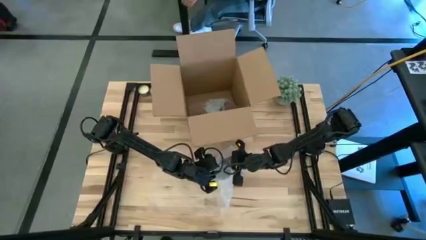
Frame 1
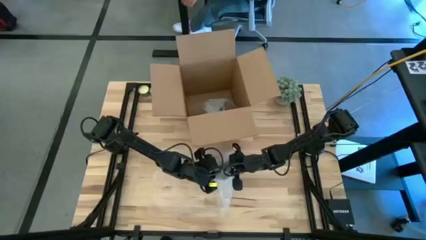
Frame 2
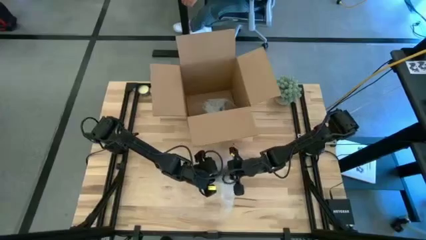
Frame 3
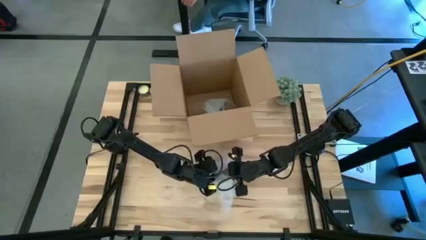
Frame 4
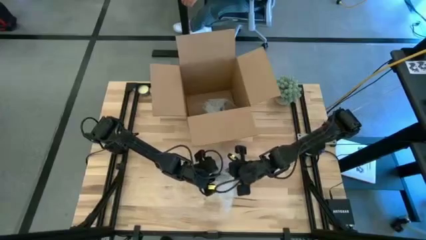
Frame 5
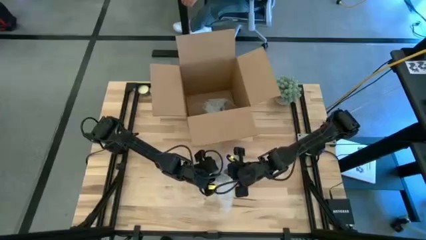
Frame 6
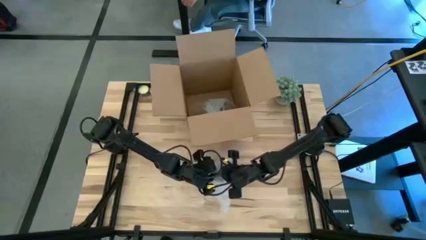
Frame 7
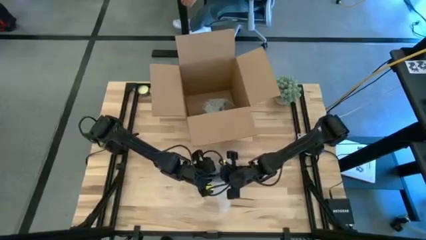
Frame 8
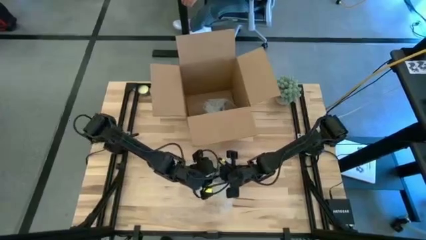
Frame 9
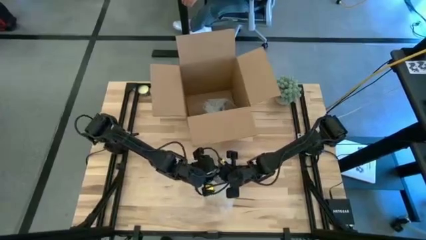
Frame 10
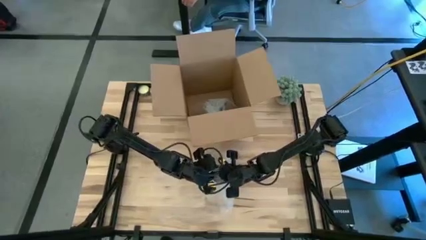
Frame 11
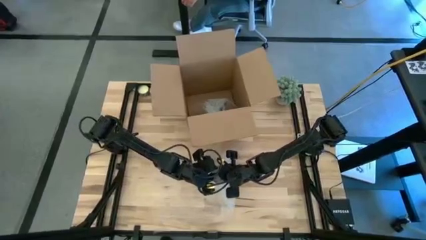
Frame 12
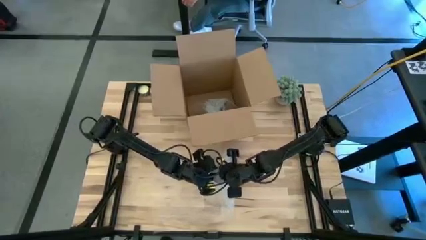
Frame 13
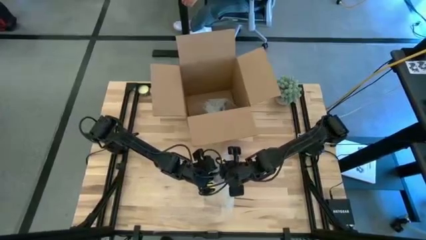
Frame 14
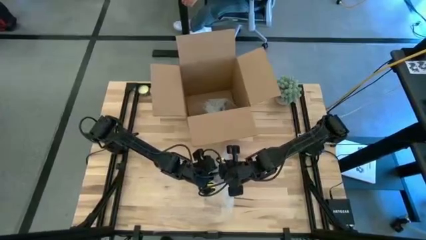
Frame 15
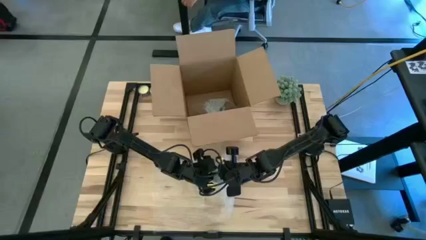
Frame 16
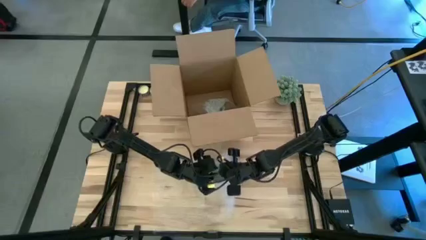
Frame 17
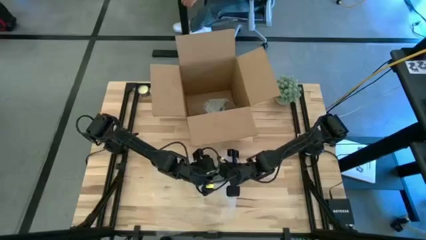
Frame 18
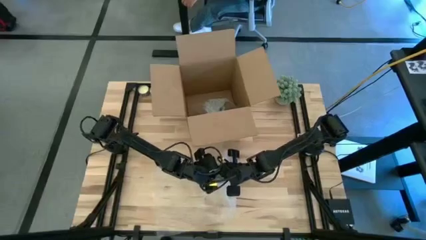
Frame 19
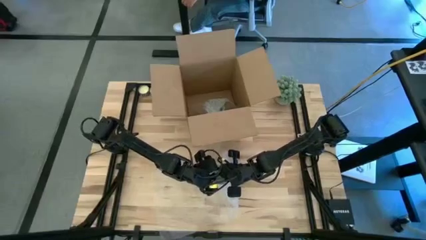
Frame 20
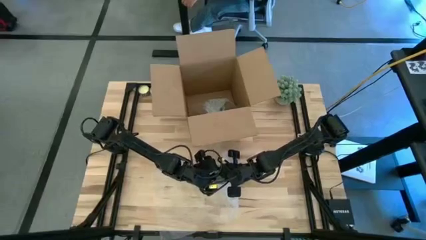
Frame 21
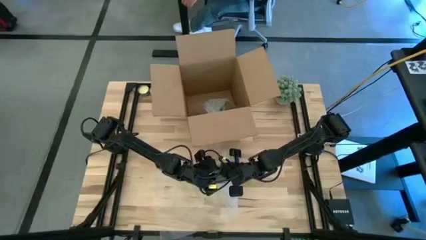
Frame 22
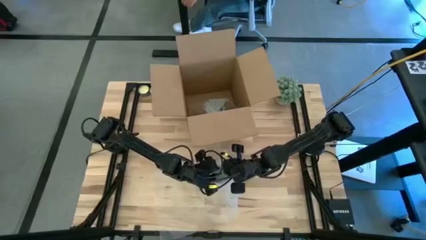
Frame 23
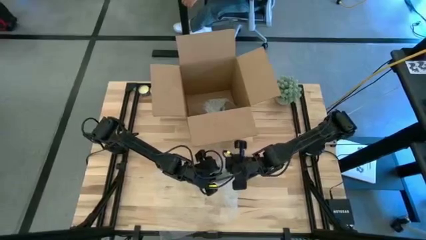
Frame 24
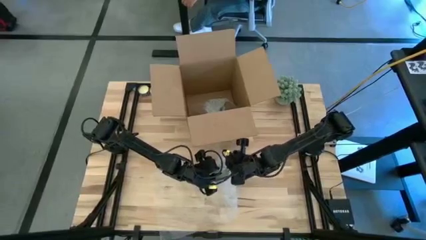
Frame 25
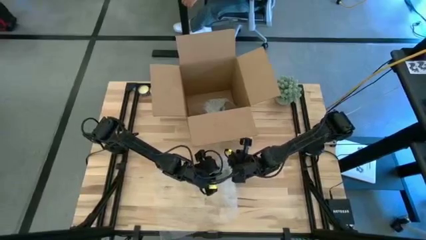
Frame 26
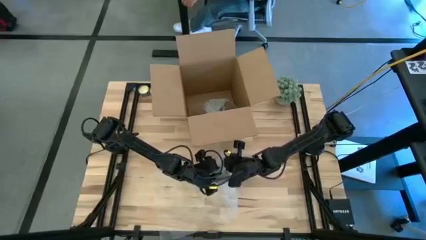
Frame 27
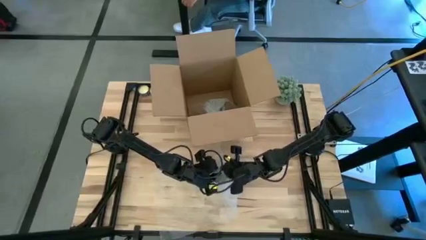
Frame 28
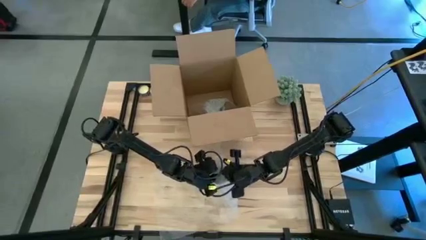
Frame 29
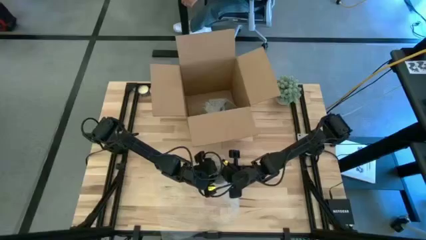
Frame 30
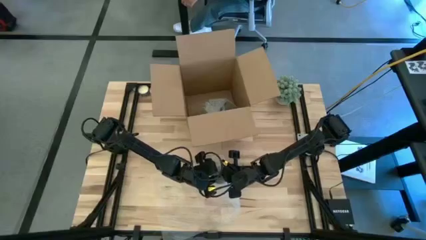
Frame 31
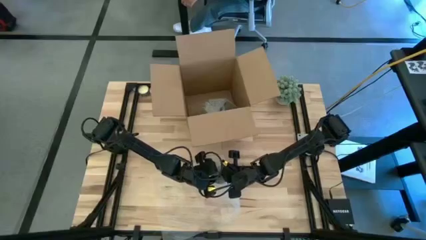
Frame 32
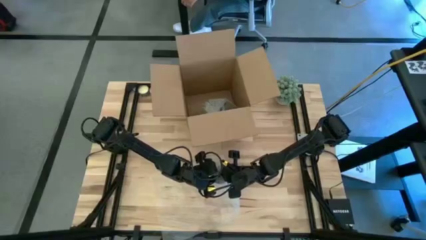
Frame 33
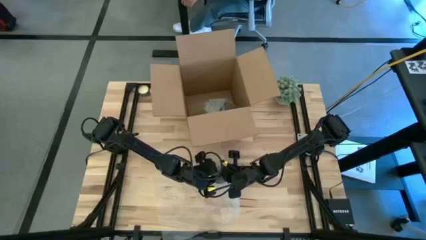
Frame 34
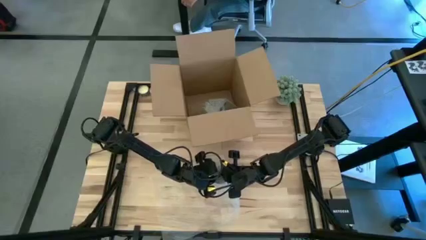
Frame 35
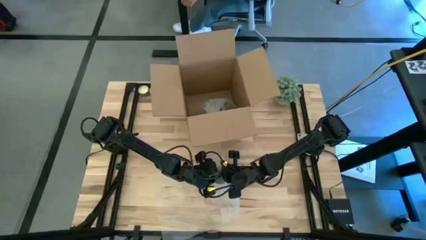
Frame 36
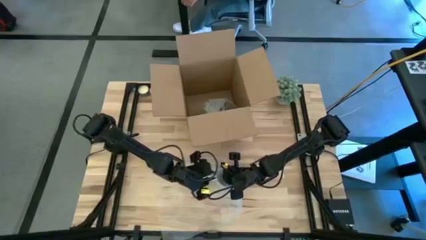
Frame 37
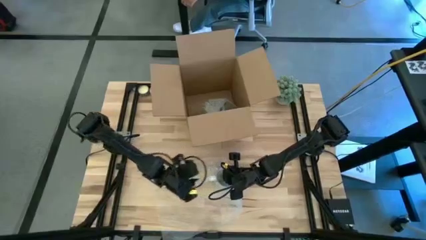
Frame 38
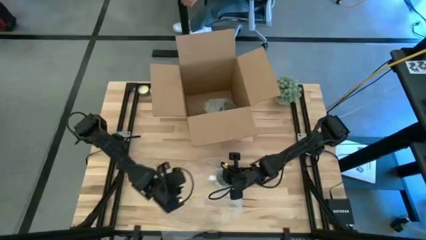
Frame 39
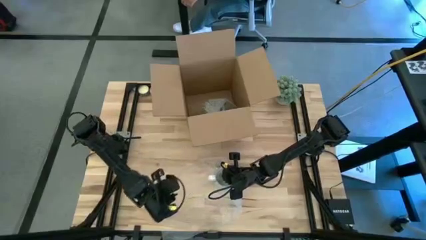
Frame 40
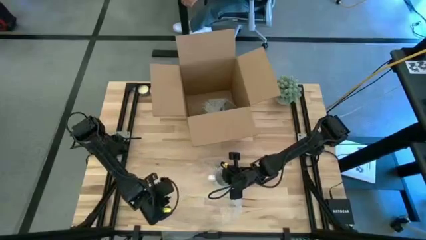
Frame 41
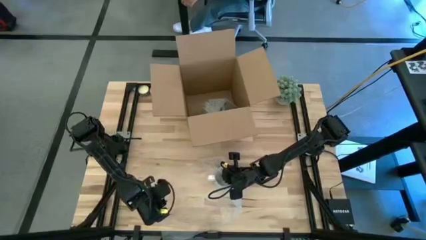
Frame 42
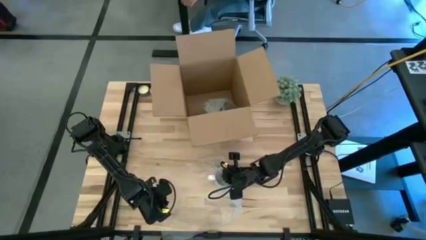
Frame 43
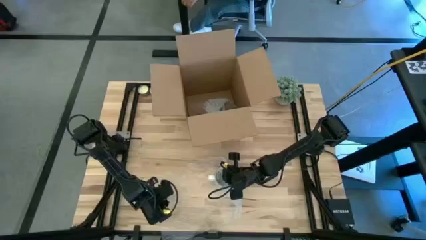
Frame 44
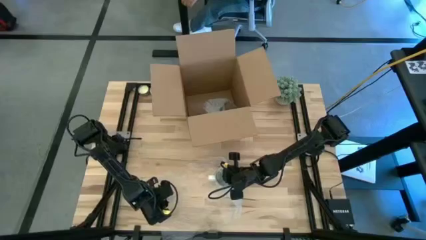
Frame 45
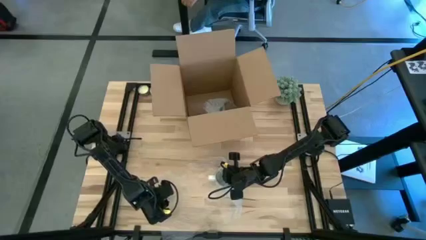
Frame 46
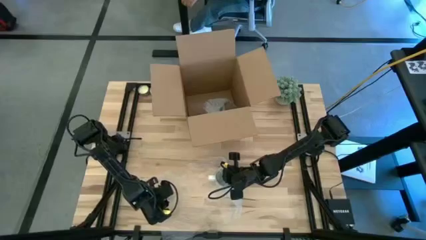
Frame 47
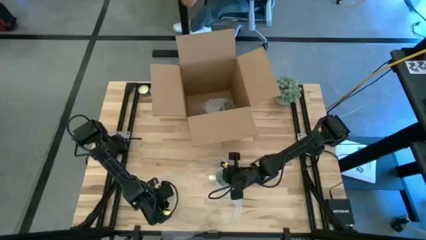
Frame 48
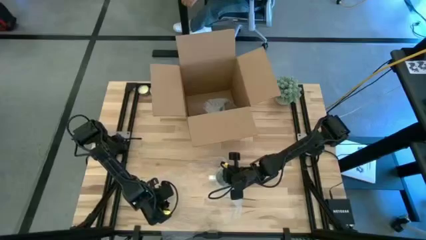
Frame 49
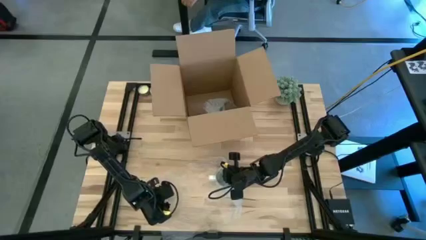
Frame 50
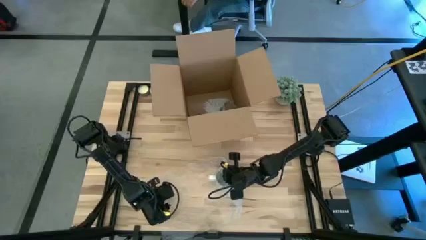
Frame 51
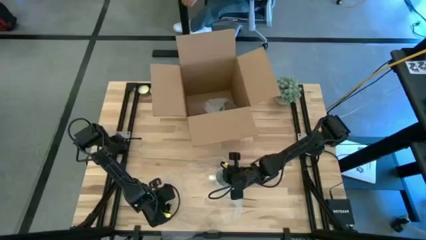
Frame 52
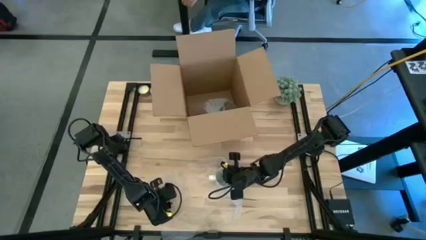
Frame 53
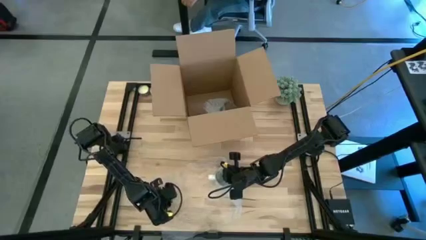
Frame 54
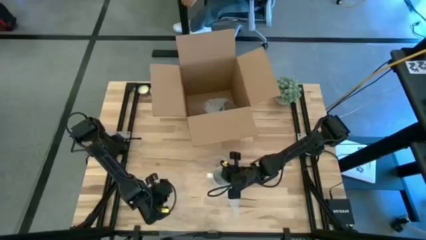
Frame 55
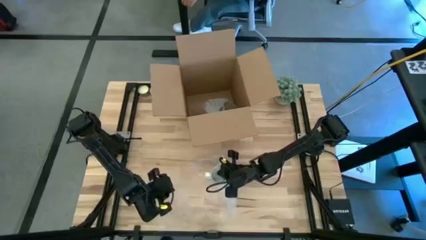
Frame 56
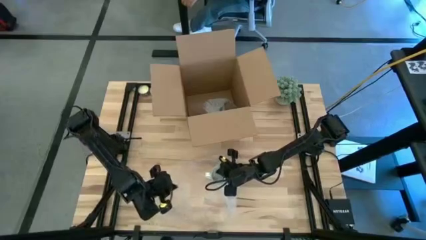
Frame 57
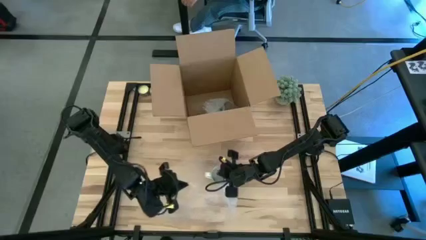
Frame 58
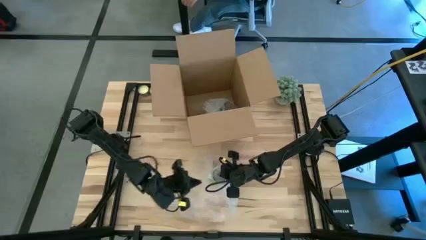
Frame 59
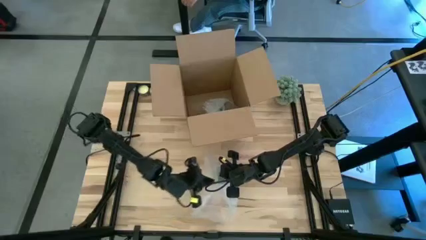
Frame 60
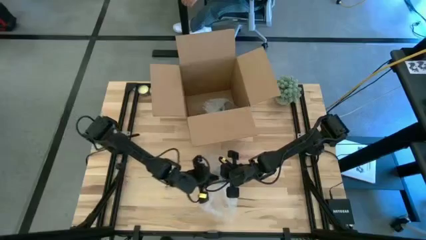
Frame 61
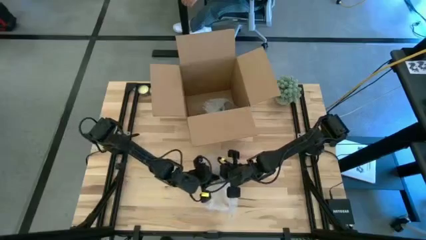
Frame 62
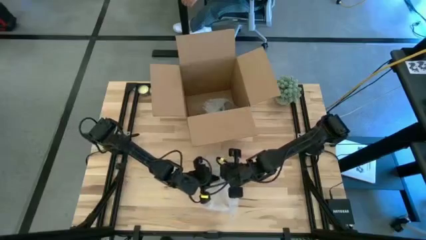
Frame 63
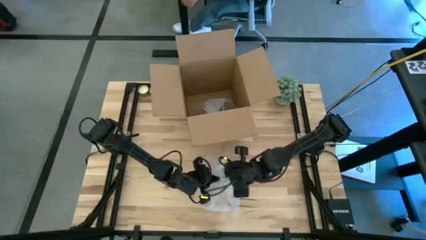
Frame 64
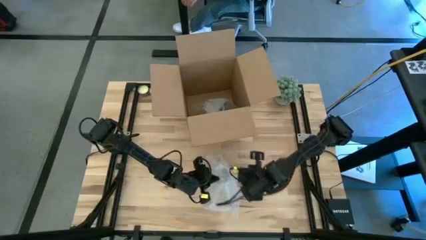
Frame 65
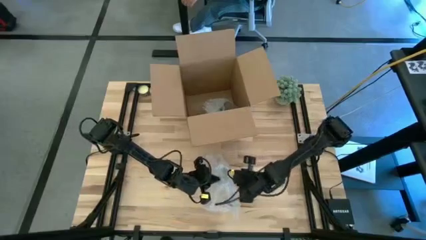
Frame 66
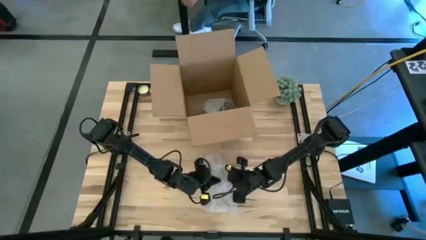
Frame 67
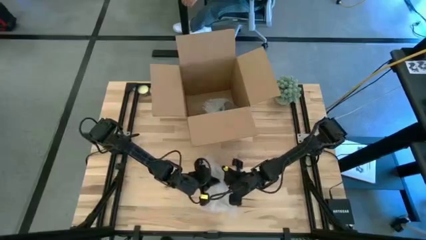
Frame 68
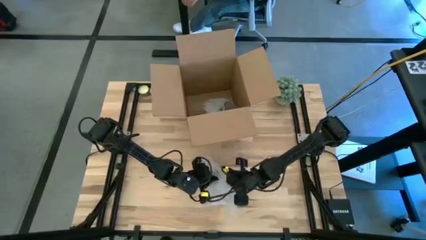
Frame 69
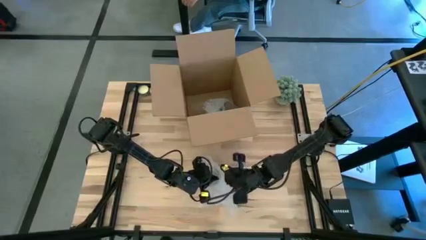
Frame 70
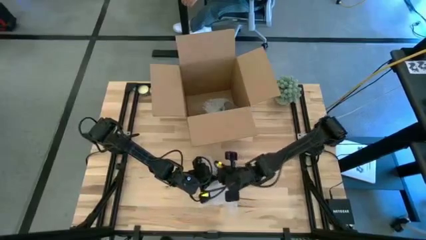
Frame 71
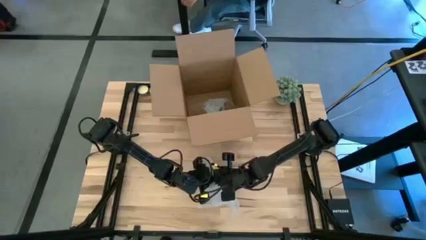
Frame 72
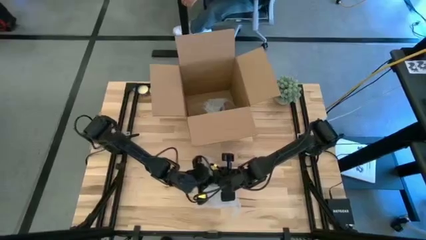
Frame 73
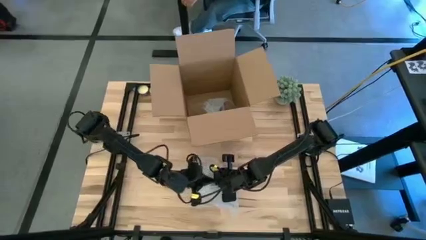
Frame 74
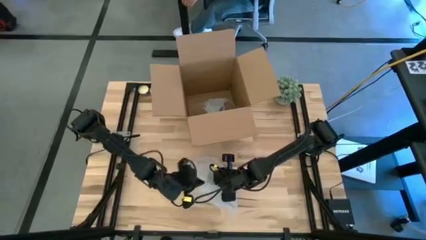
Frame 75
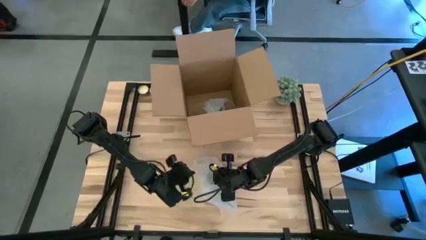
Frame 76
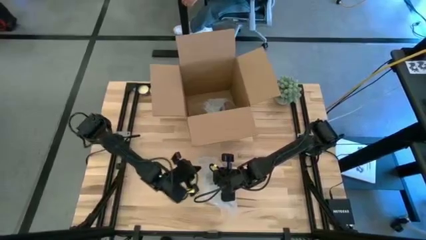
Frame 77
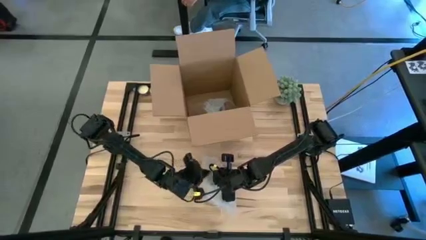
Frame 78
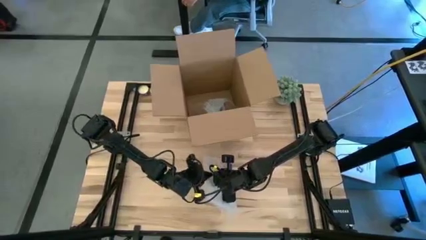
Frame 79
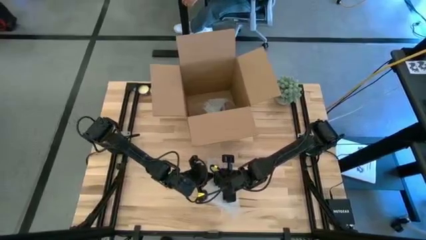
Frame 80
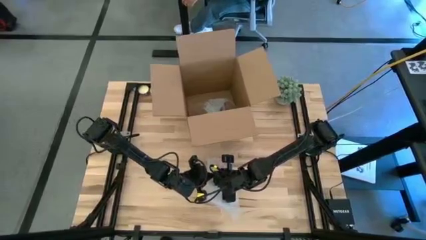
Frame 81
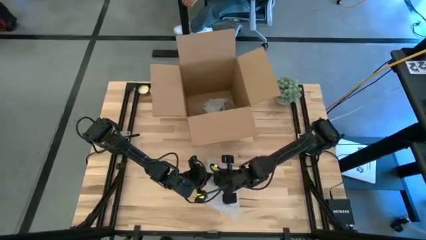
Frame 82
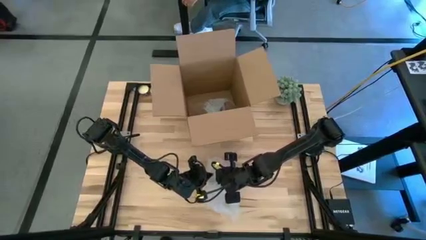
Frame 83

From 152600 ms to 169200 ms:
Task: wrap mug
Wrap the white patterned mug with the transparent bubble wrap
